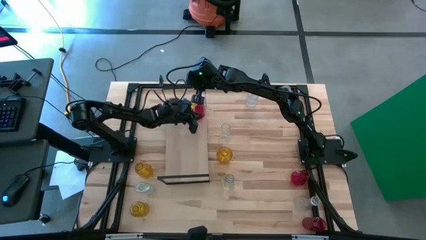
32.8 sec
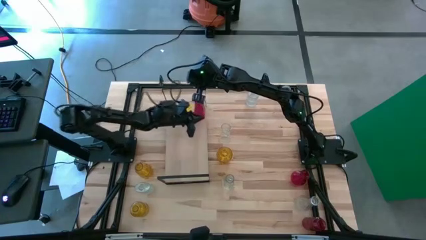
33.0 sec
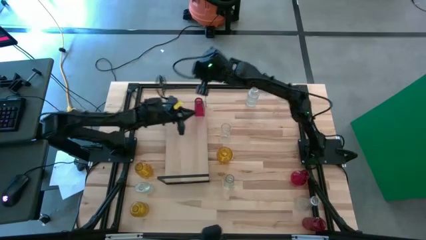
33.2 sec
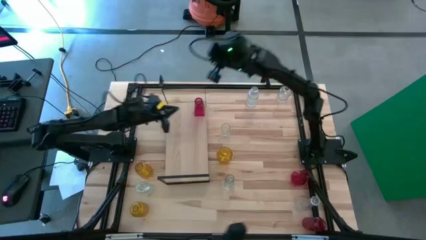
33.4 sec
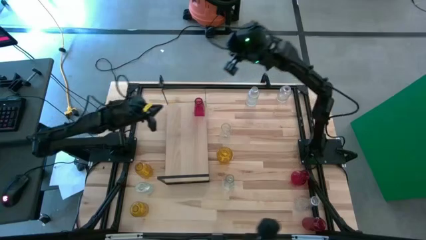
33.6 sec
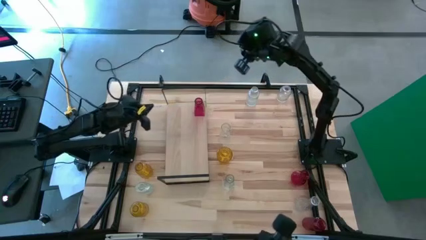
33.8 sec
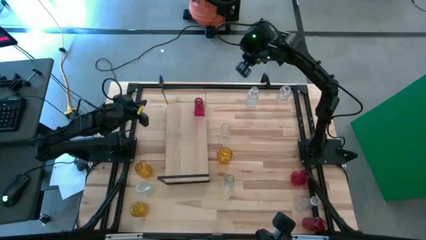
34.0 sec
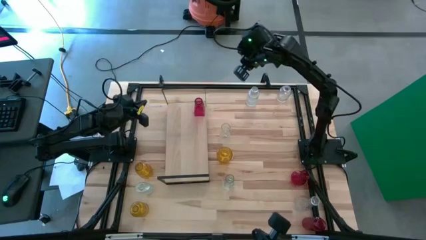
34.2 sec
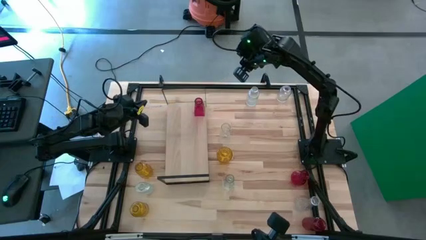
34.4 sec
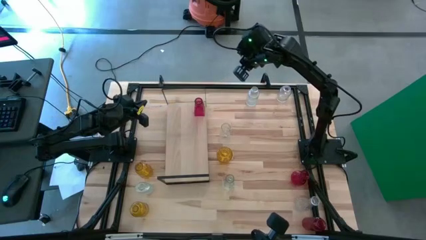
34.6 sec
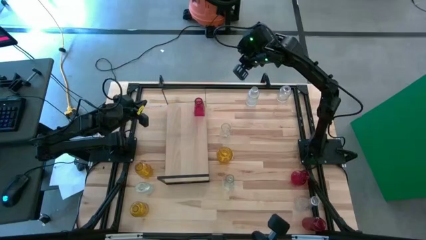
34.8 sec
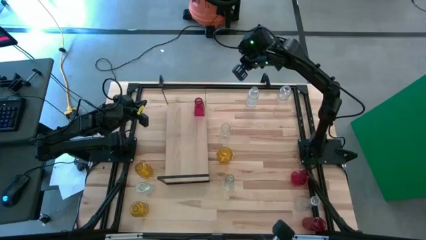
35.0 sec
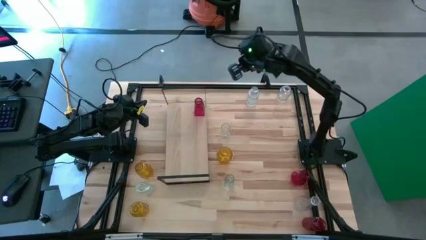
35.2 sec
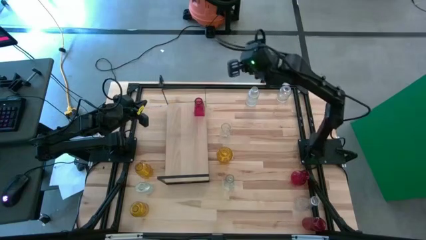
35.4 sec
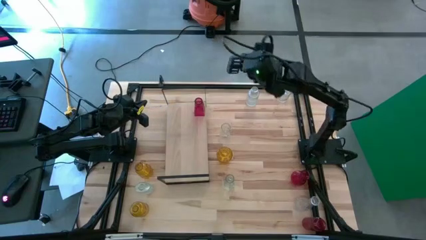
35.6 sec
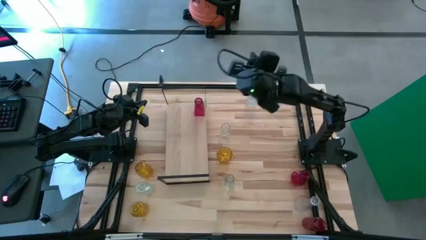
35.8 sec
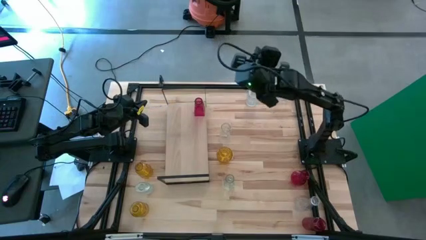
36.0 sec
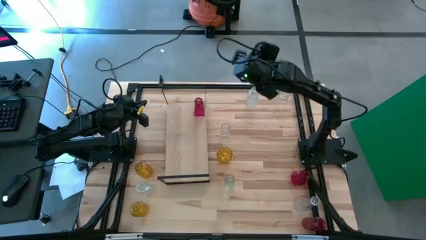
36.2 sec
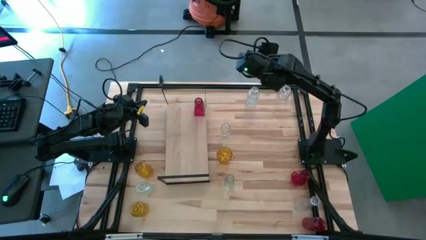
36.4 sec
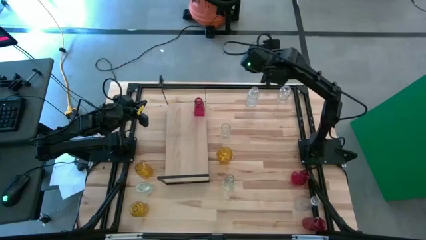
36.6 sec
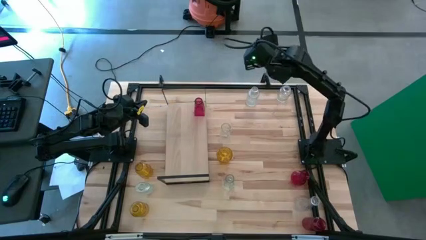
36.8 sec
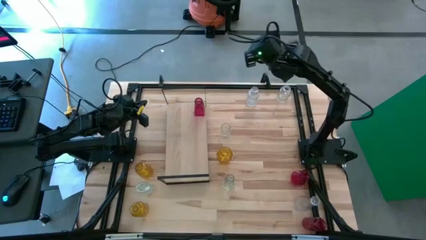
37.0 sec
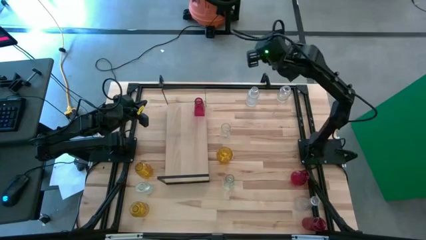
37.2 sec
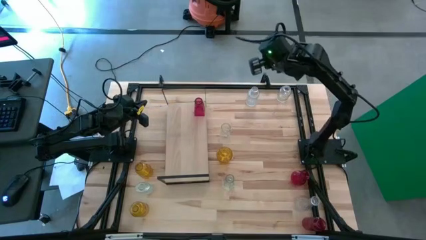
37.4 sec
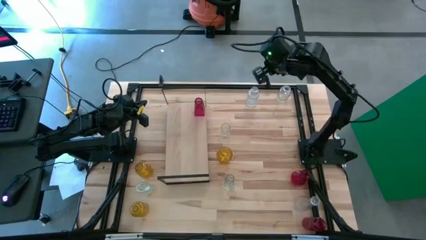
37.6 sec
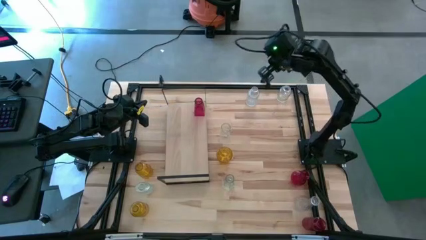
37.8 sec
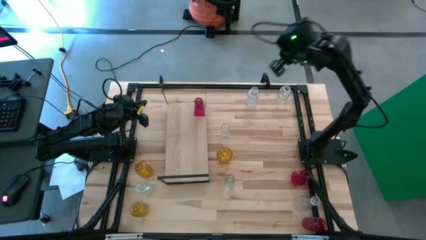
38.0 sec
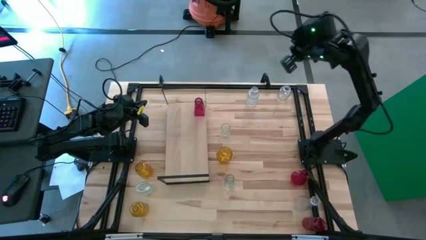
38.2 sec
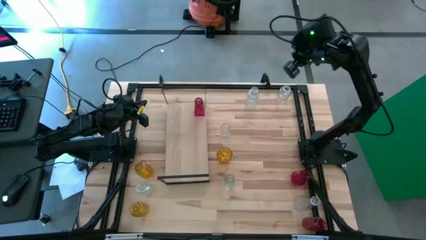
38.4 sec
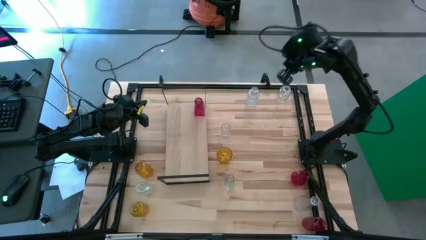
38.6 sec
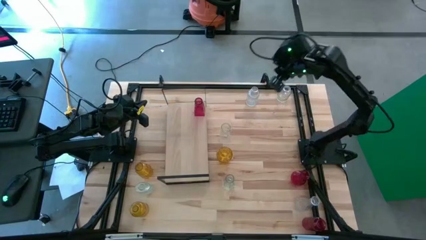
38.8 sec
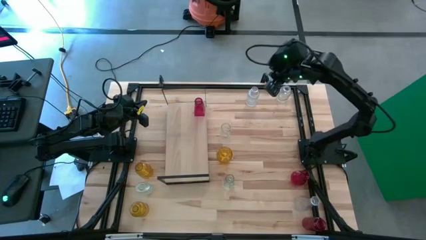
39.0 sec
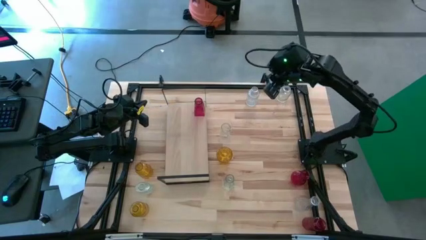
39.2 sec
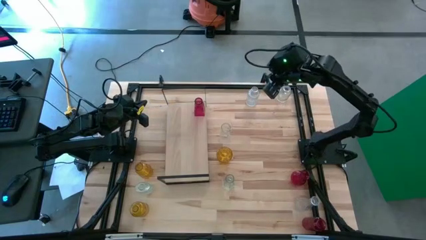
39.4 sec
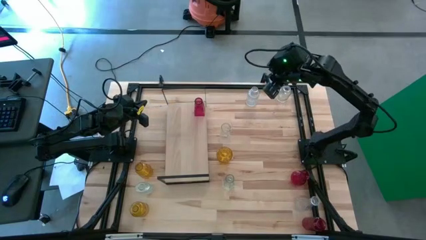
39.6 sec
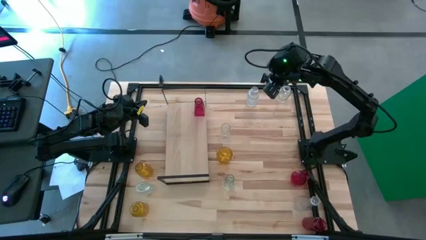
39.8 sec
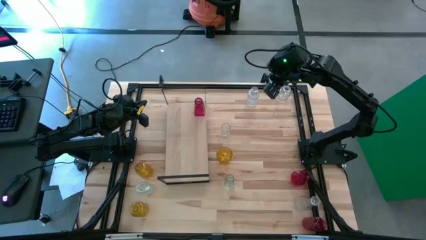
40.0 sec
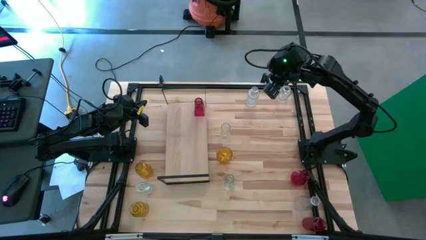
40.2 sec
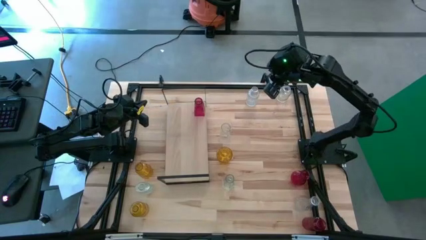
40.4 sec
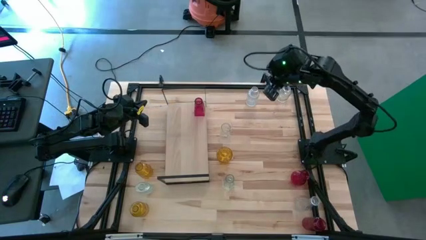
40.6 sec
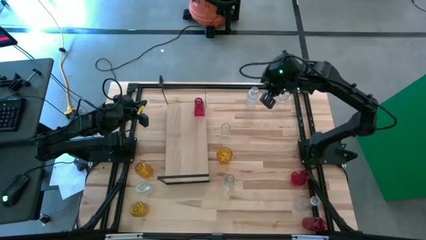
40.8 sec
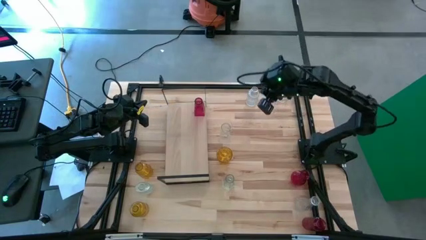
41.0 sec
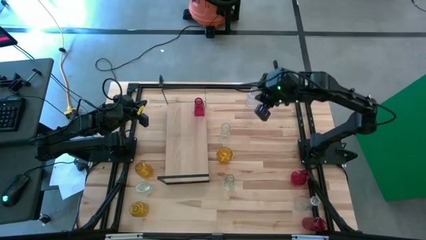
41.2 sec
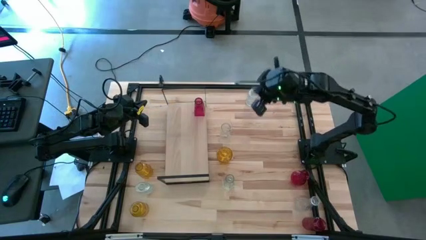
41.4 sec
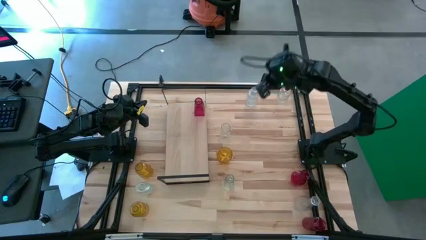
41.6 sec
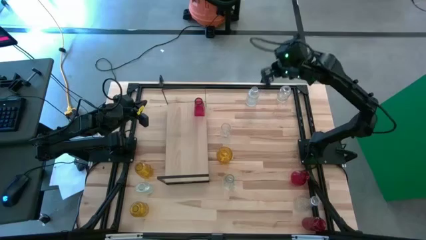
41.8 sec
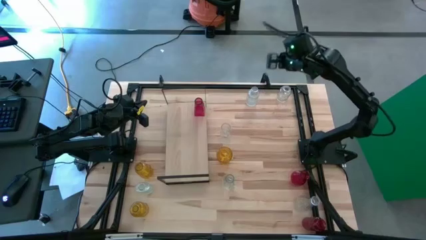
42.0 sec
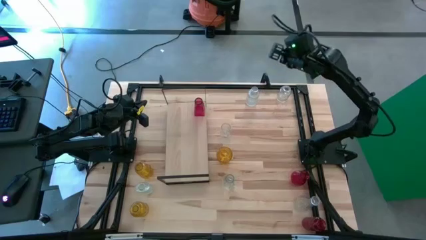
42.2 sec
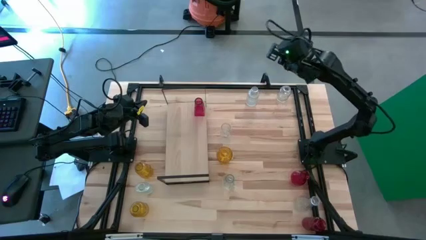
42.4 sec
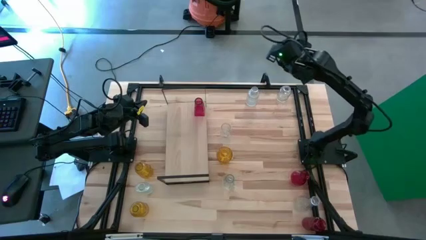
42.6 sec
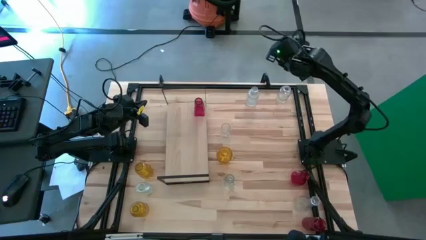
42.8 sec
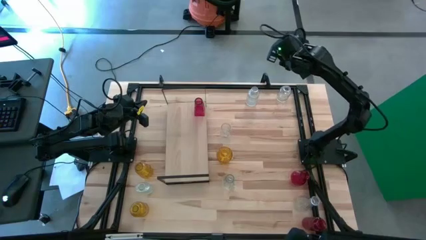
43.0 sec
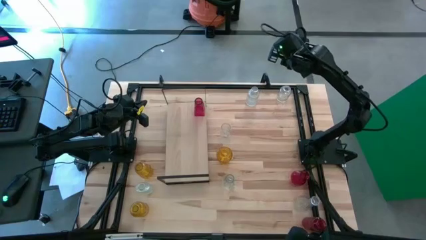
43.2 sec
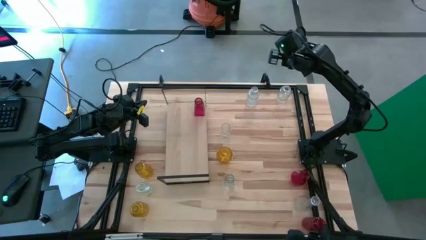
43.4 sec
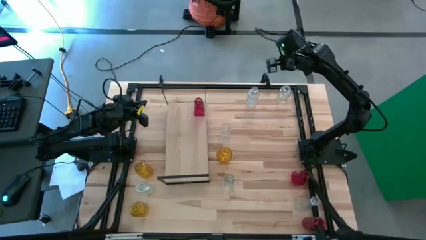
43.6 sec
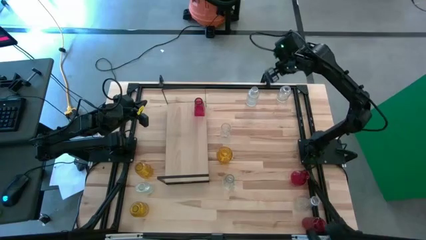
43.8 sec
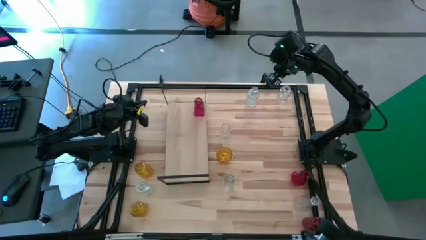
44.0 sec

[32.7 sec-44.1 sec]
Task: sort vases onto shelf
Put the transparent vase on the shelf
